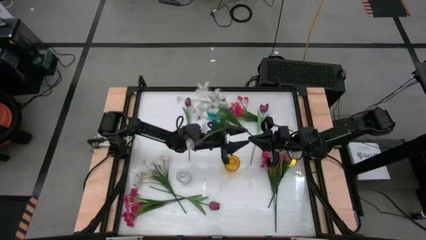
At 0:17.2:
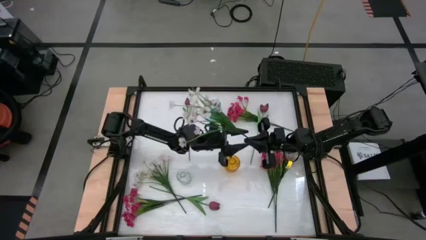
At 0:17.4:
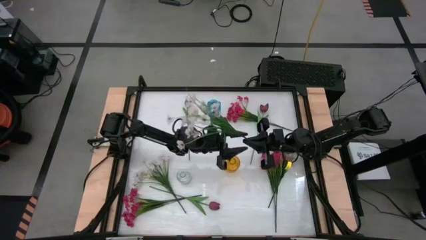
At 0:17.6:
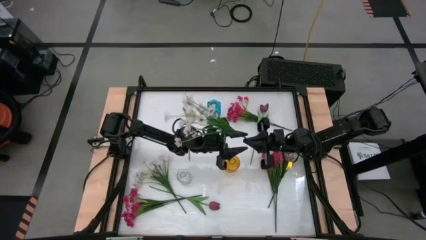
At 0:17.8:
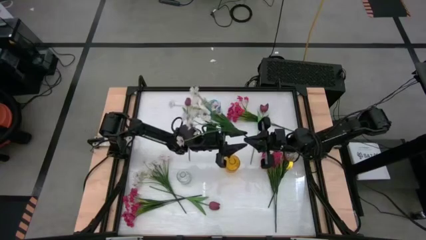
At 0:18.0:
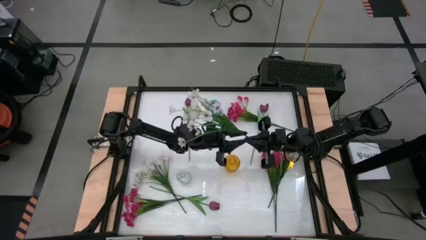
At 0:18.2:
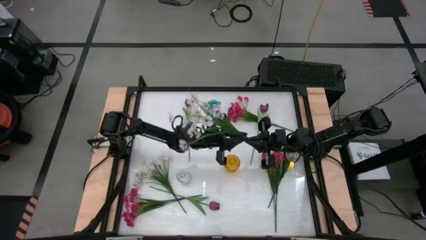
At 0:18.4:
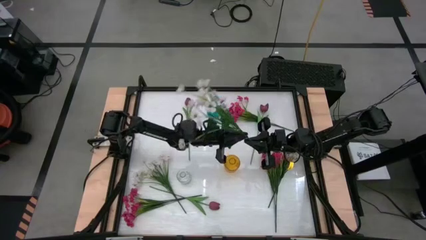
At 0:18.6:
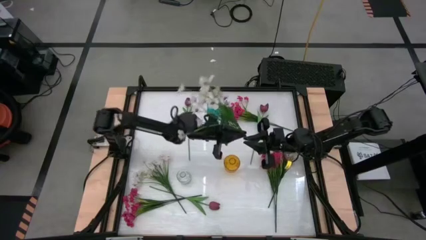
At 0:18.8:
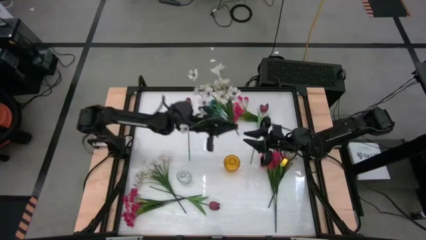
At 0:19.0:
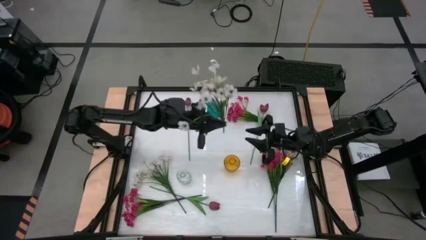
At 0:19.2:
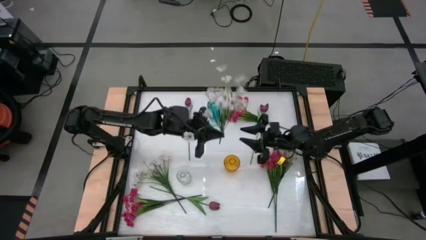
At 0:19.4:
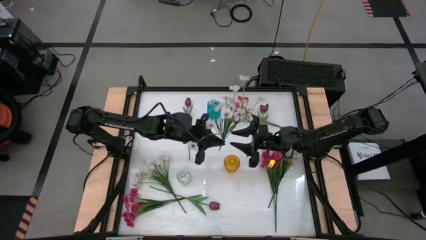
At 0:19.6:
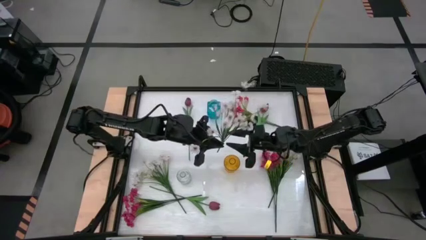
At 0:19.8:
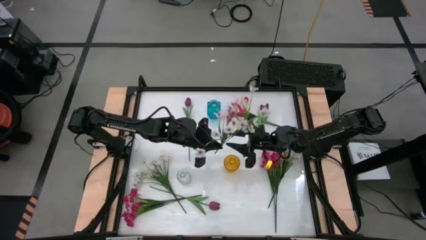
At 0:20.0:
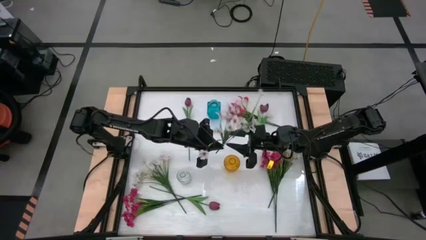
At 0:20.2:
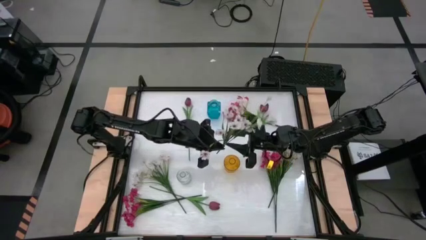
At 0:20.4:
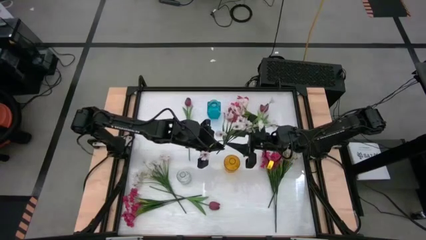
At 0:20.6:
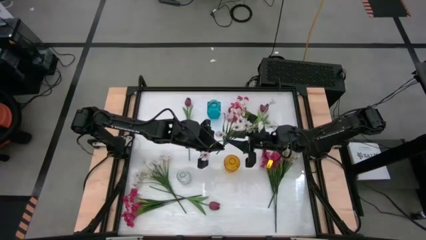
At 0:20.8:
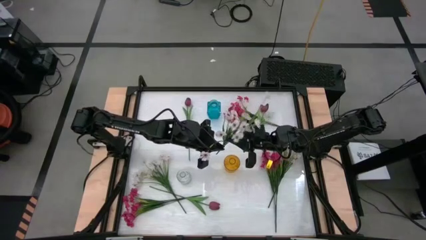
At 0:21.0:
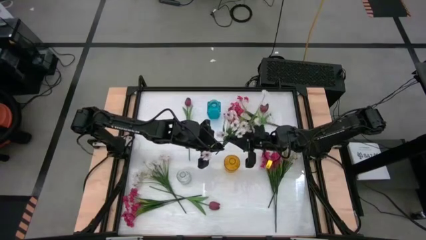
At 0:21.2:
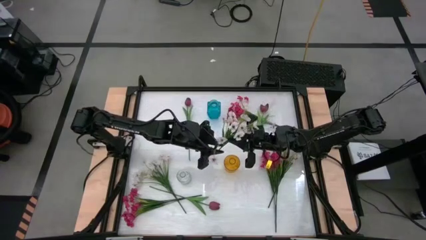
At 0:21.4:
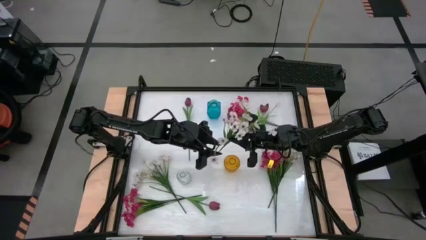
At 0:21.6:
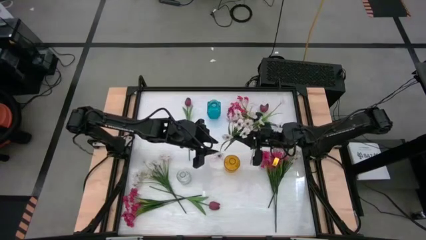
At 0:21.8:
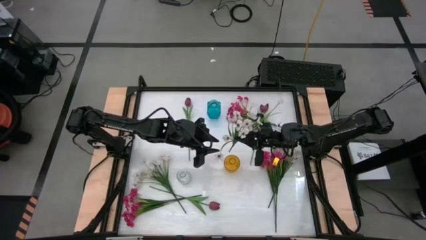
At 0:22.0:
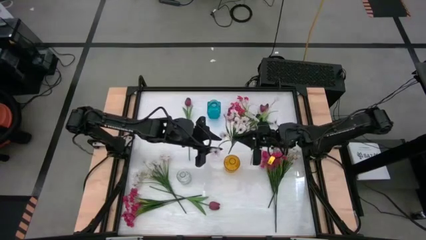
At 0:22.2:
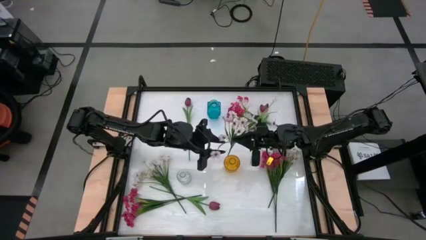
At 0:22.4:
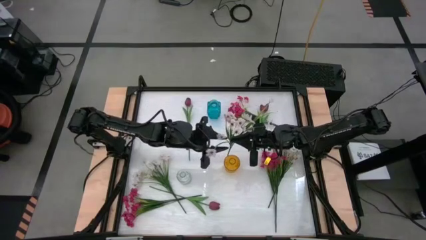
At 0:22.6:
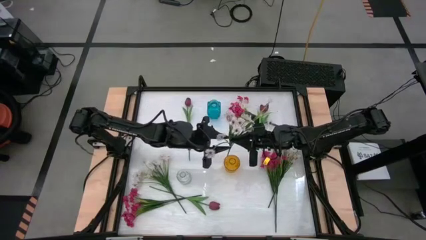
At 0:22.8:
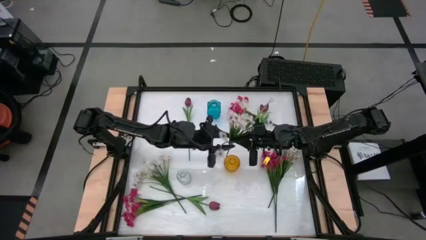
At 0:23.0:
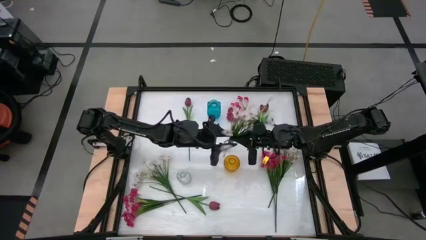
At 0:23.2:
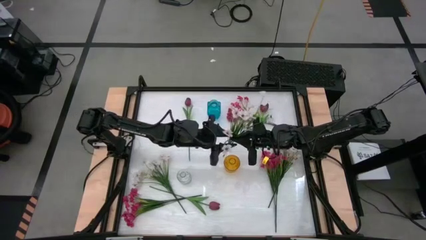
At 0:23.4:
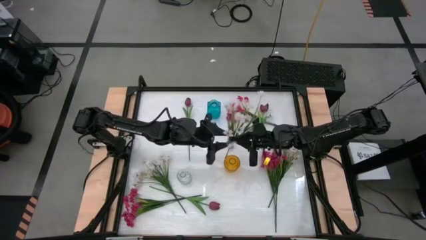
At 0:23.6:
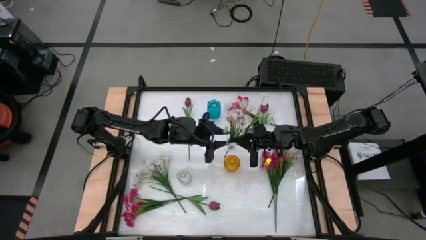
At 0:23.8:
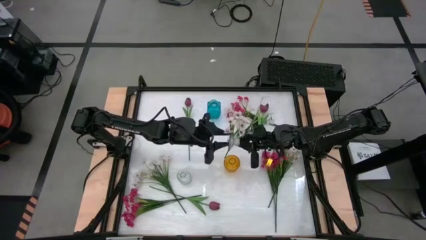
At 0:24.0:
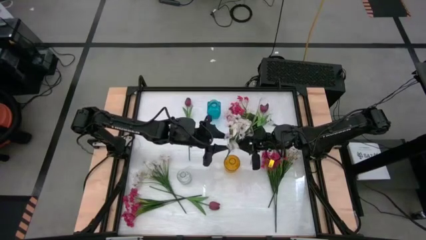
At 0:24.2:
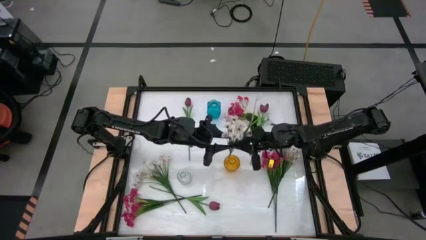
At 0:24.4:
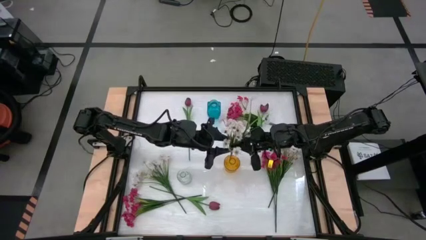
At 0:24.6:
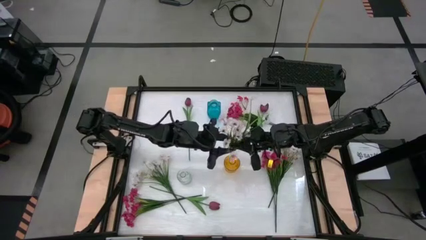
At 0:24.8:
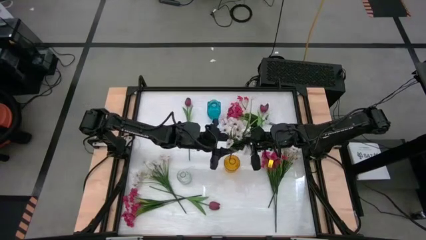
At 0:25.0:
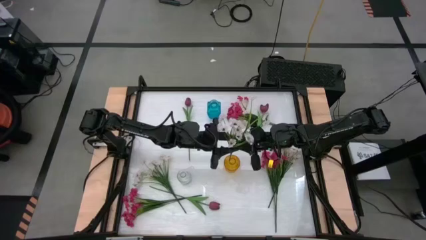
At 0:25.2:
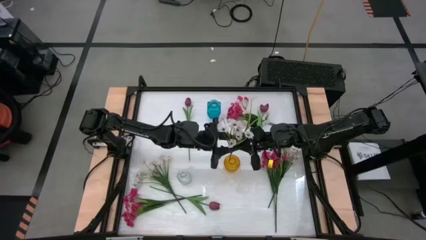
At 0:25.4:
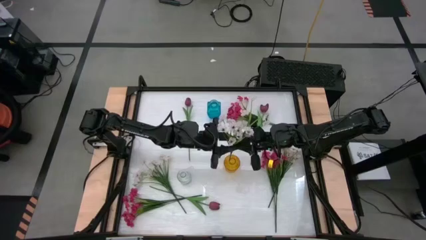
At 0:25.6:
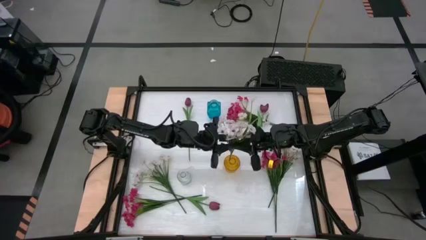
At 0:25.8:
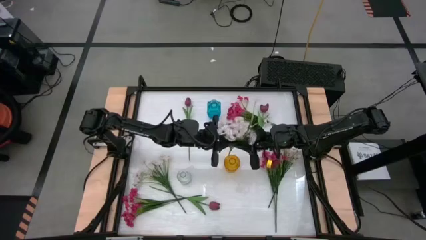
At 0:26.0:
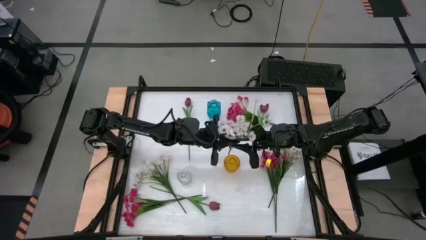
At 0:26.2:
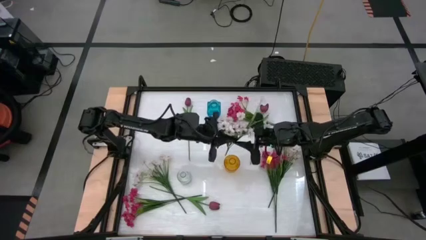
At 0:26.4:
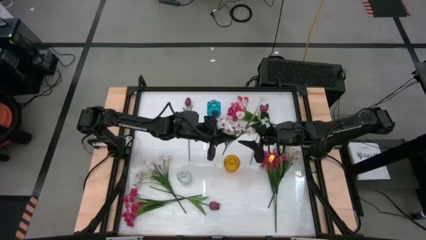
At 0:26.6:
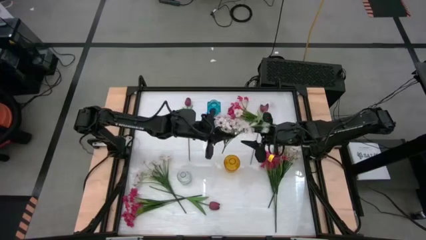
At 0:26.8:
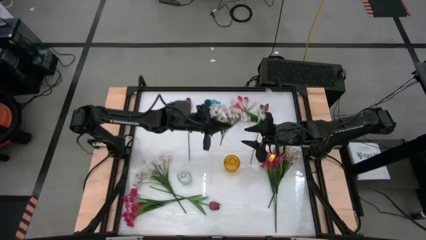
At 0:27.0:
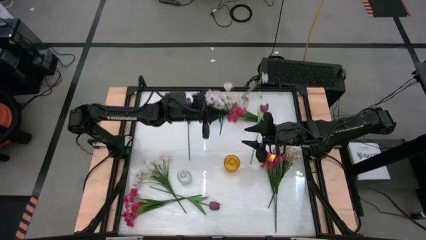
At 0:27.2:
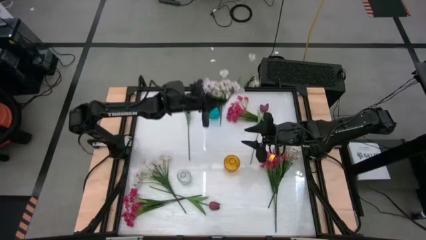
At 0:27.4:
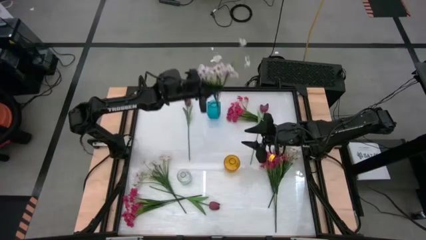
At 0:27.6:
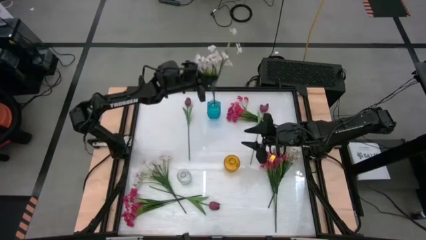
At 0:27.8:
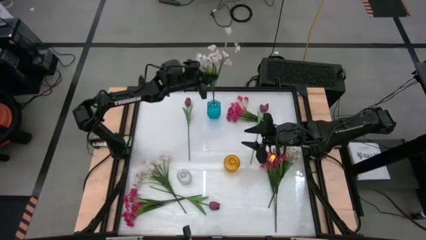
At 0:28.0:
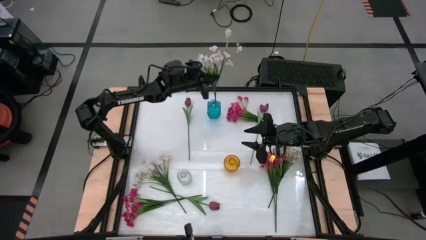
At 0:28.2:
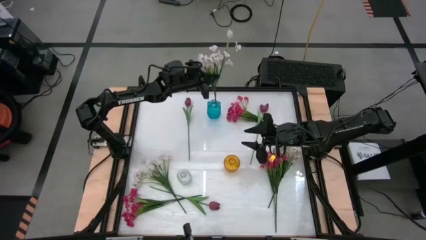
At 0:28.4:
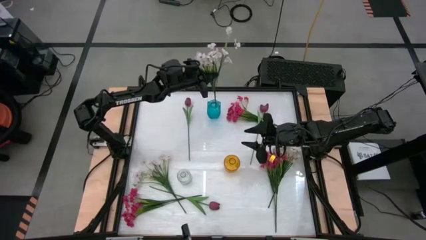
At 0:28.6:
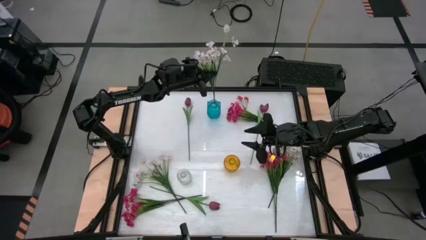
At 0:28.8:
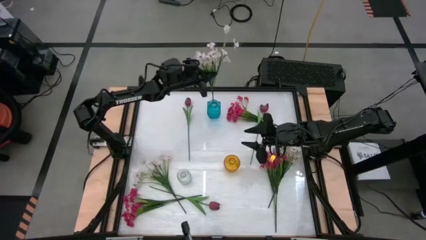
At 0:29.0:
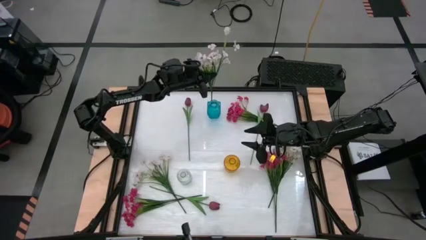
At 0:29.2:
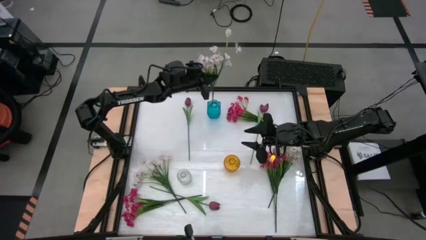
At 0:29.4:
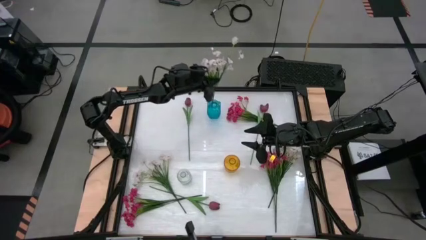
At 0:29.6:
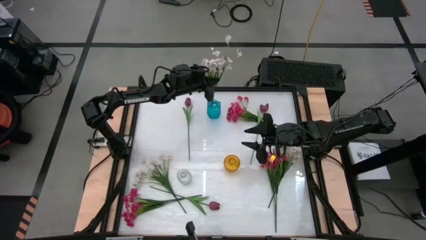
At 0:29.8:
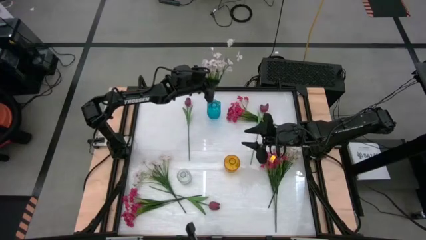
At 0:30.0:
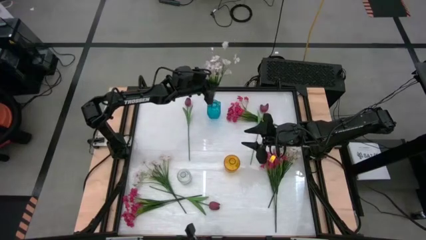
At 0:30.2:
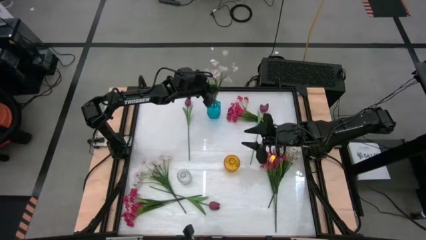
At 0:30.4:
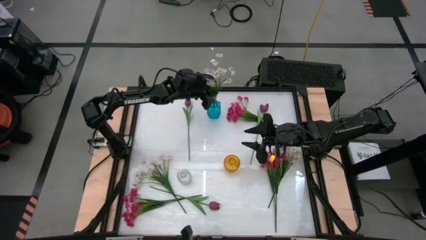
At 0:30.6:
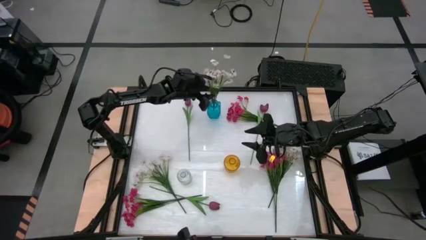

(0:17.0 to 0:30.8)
Task: Sort flowers into vase by color
Put the top white flowers into the blue vase
